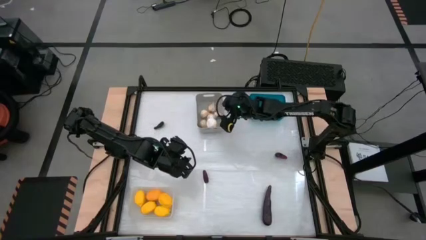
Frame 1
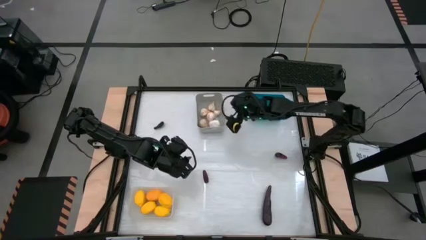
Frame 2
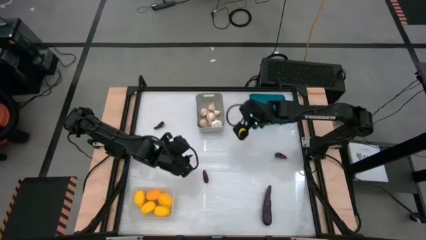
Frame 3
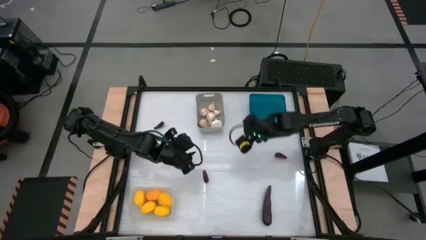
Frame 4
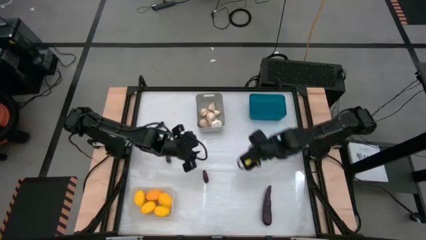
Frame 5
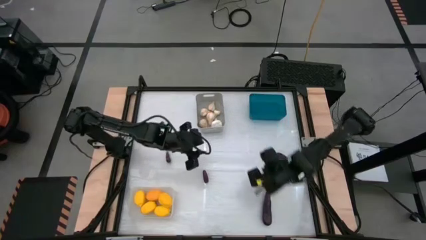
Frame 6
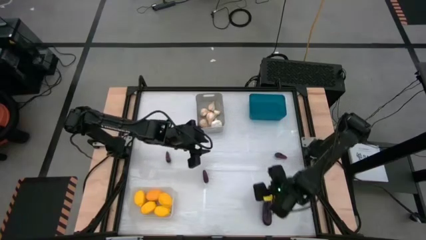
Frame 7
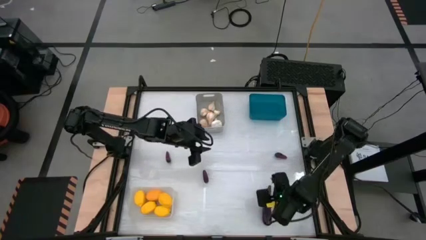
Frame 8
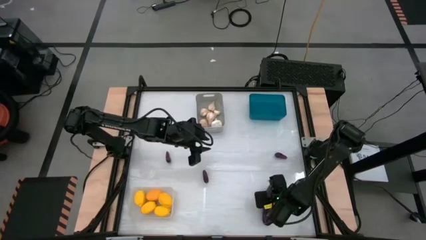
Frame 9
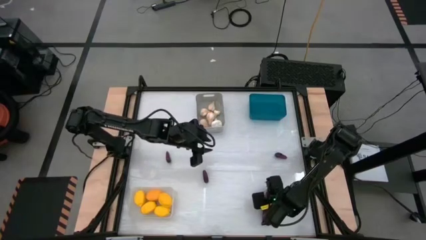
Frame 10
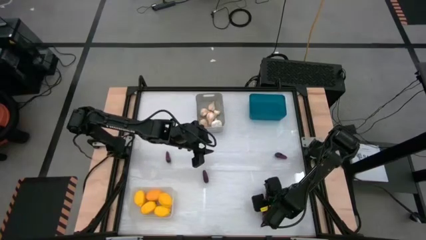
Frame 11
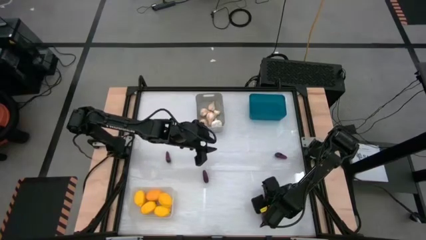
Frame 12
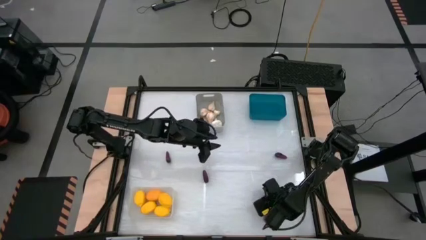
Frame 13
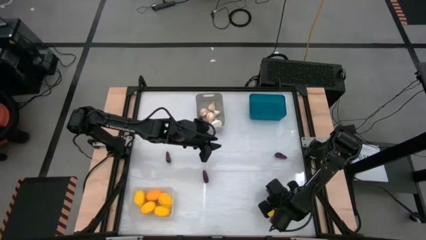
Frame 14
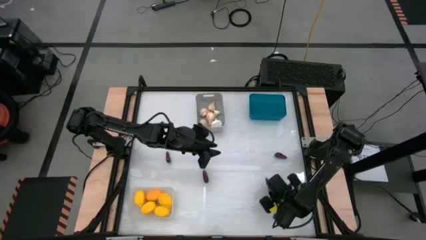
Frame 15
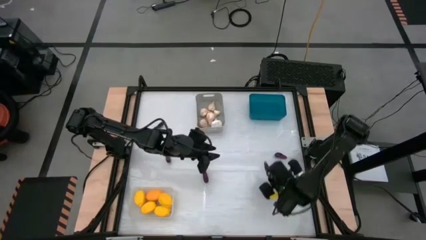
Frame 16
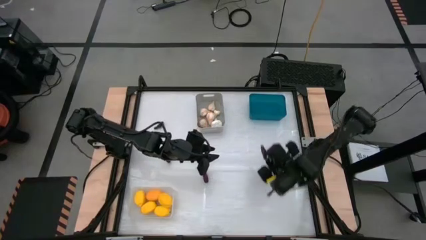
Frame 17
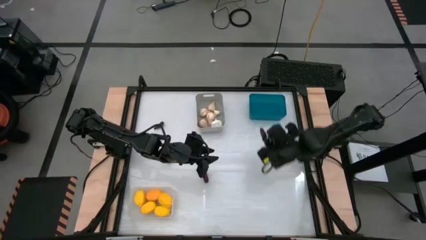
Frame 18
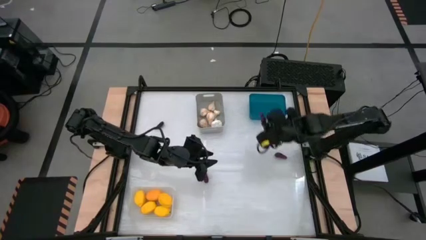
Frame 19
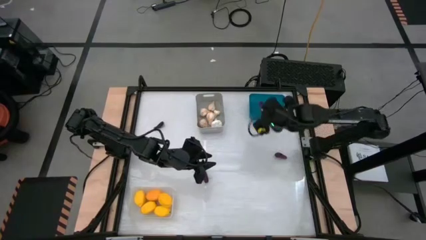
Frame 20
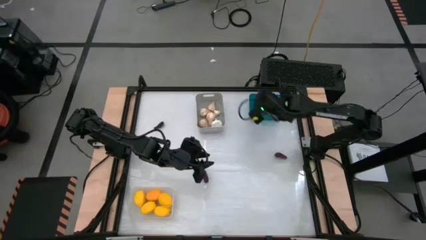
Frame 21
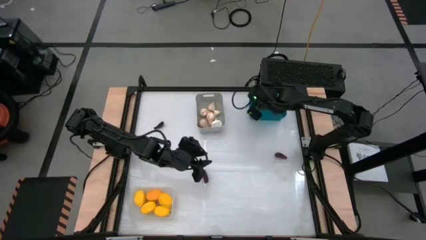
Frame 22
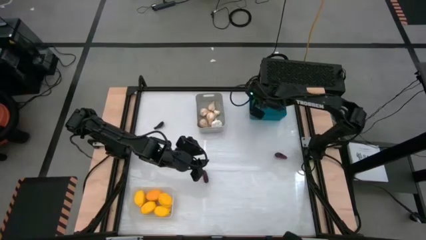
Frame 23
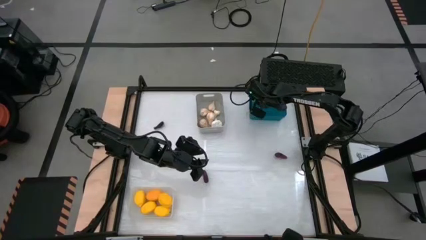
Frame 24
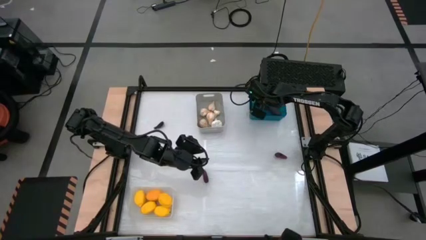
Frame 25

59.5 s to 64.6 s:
Task: Sort produce into baskets
Put the egg plant into the blue bin

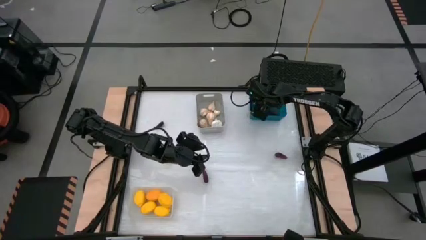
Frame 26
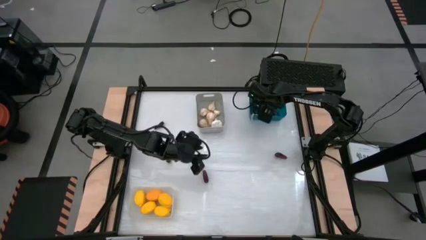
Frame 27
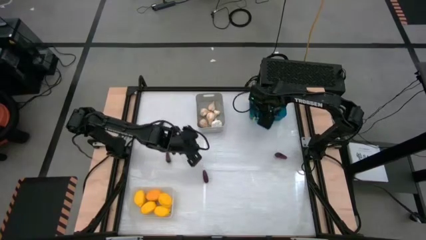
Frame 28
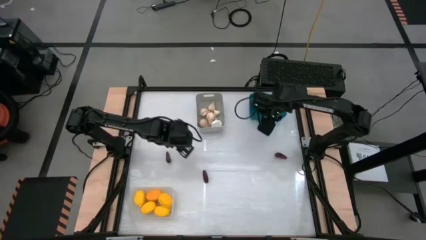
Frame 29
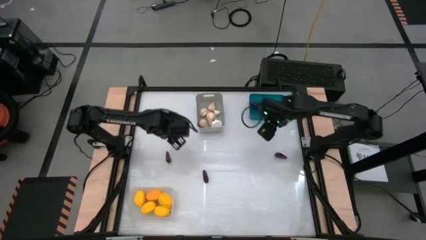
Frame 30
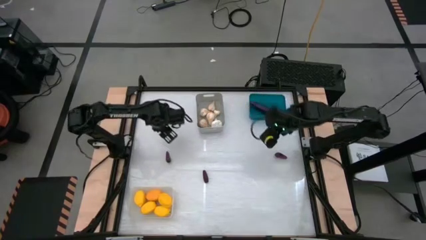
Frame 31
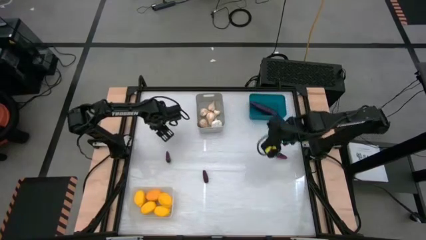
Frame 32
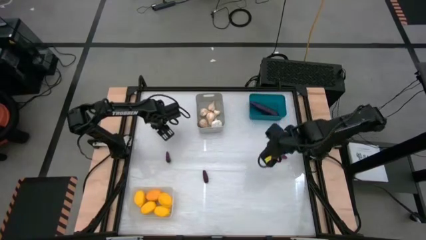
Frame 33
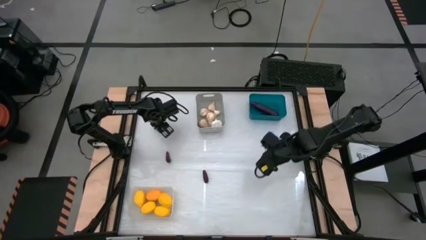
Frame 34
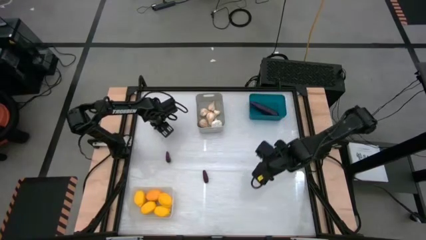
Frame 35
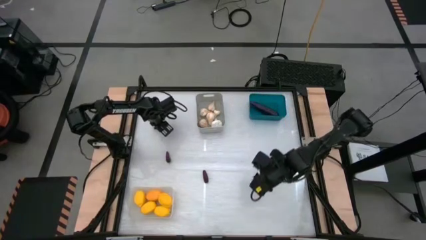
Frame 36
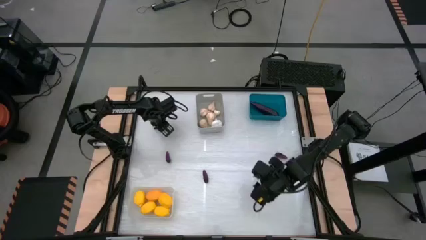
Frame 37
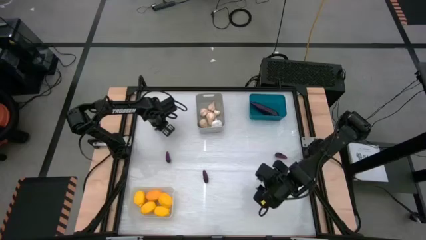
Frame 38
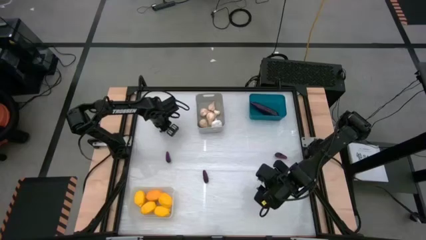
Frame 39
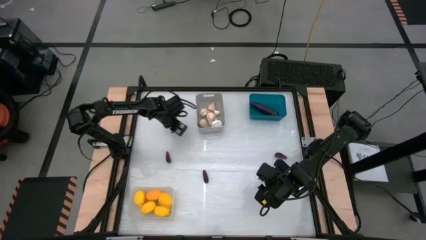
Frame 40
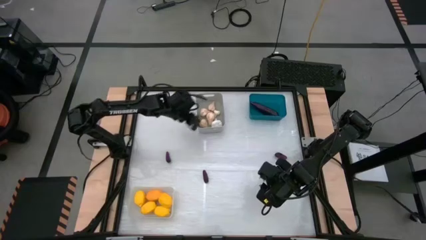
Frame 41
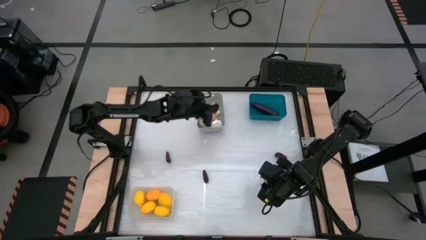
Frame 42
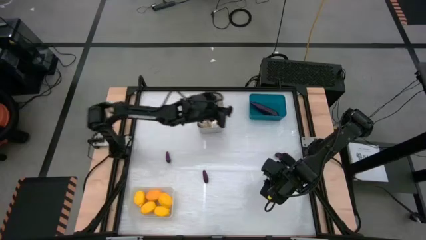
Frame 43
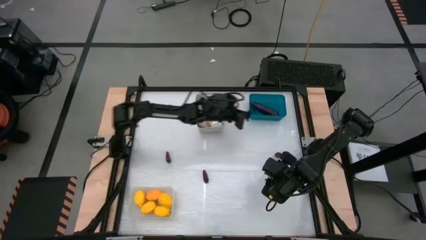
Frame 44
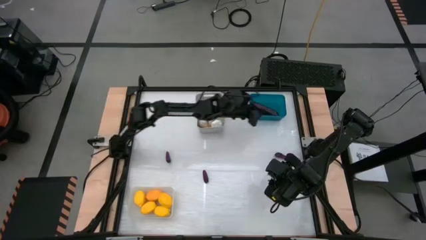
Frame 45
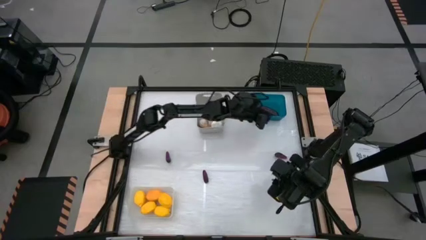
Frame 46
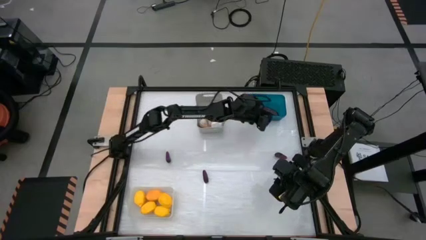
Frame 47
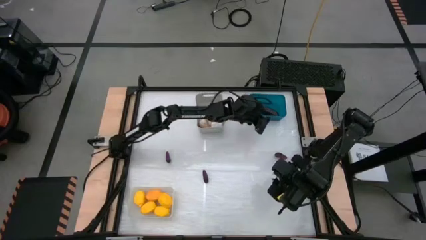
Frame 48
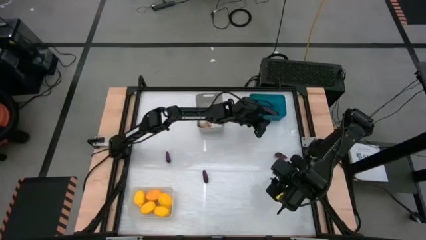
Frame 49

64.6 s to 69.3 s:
Put the egg plant into the blue bin

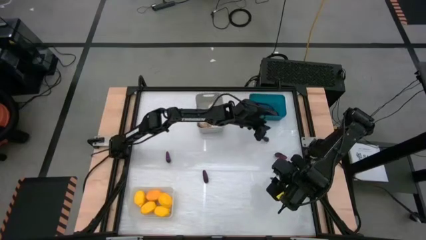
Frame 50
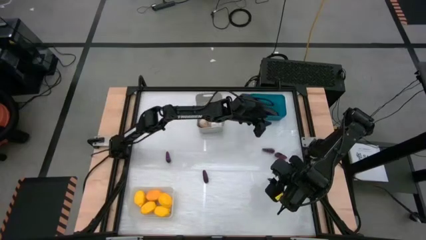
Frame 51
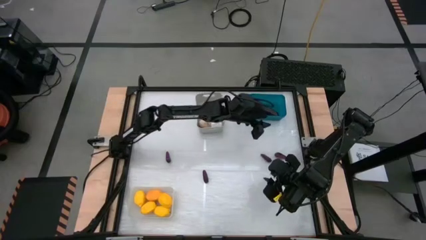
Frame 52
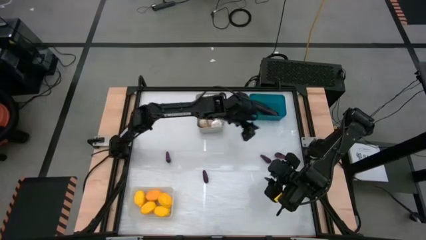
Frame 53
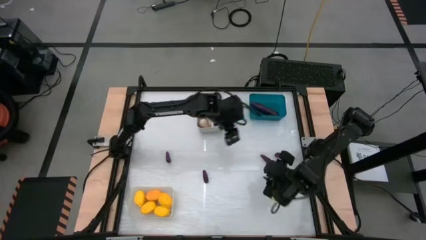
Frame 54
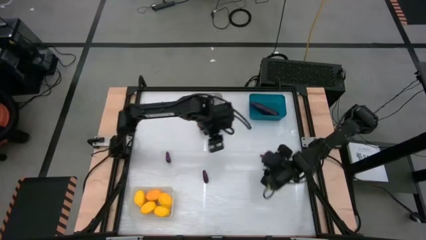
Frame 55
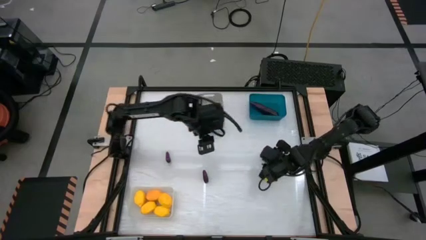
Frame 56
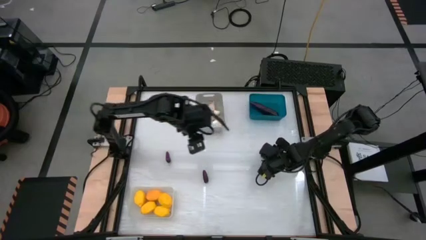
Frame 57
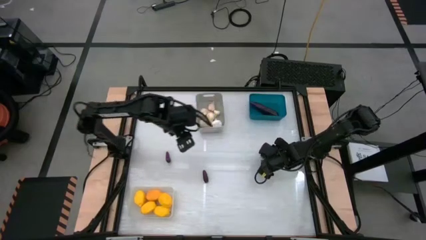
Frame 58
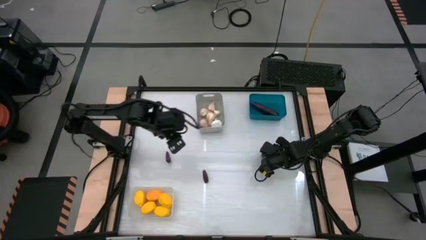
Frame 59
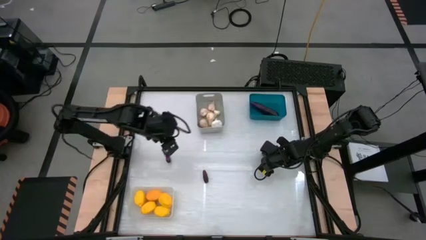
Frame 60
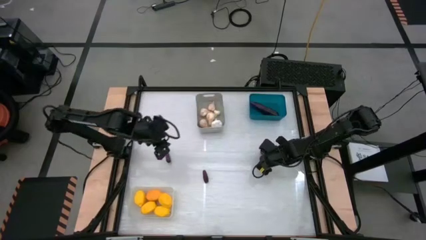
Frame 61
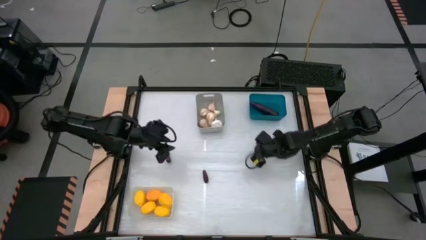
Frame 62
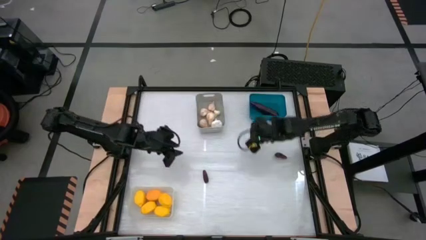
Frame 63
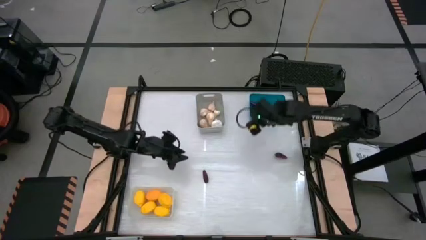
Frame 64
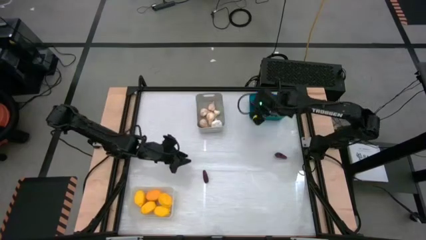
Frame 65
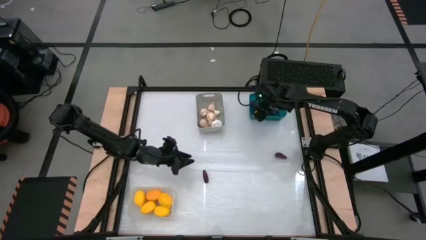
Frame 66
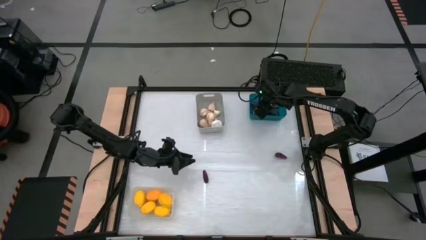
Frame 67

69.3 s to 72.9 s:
Put the egg plant into the blue bin

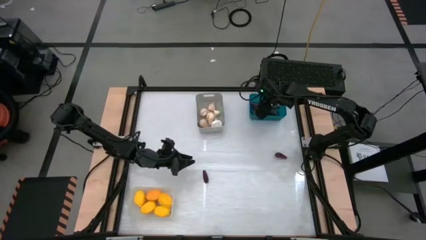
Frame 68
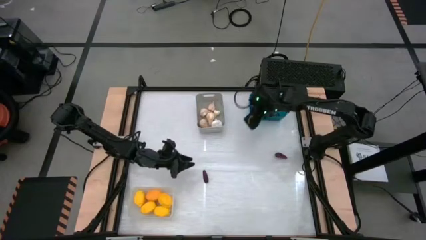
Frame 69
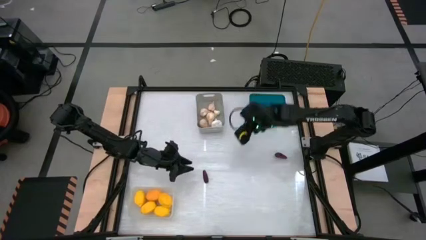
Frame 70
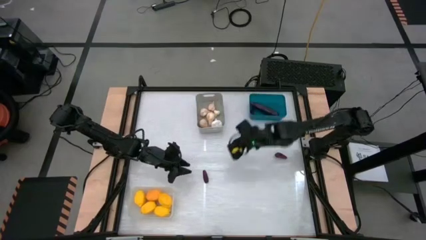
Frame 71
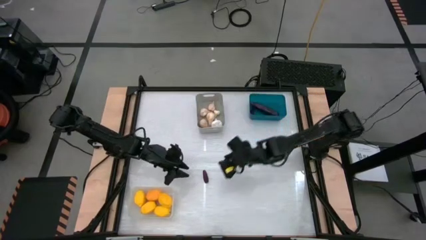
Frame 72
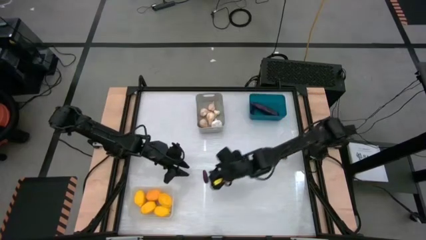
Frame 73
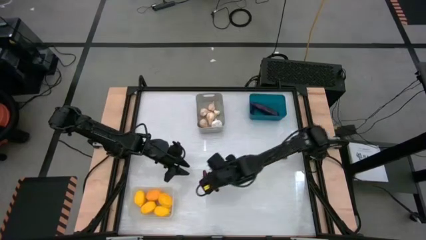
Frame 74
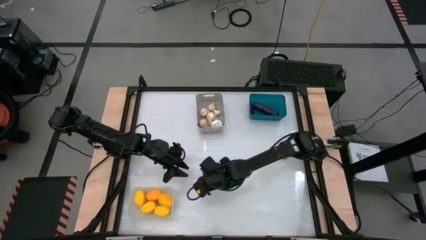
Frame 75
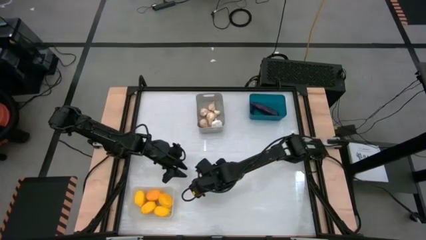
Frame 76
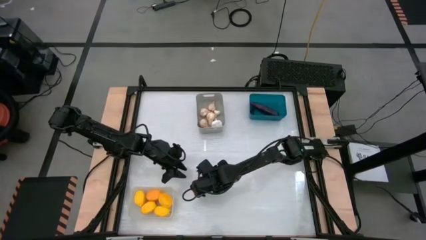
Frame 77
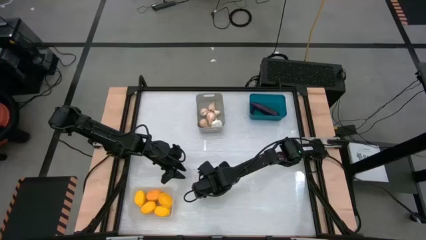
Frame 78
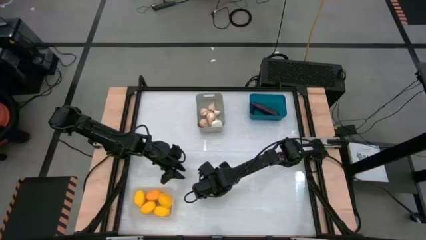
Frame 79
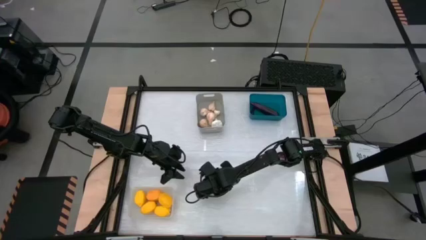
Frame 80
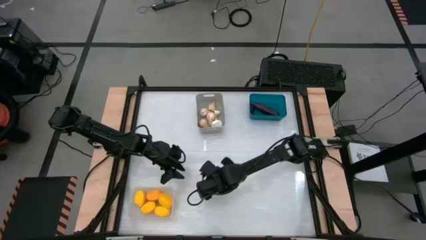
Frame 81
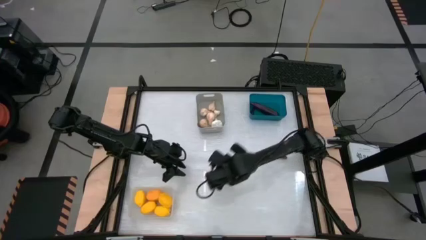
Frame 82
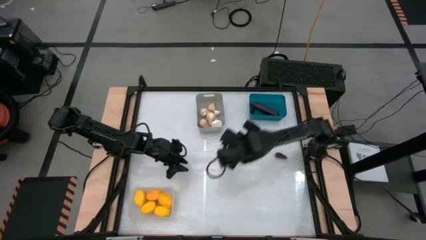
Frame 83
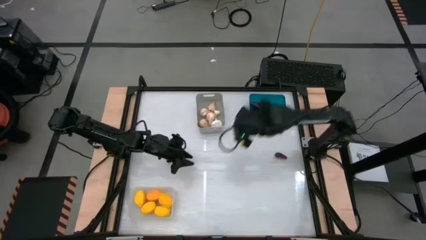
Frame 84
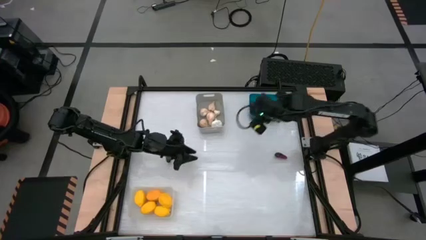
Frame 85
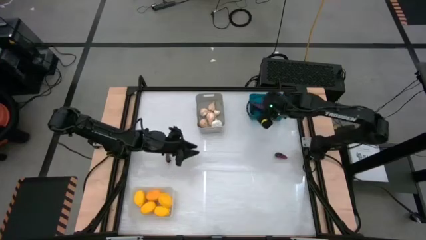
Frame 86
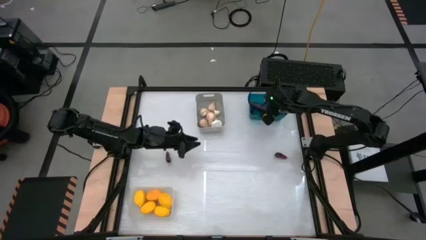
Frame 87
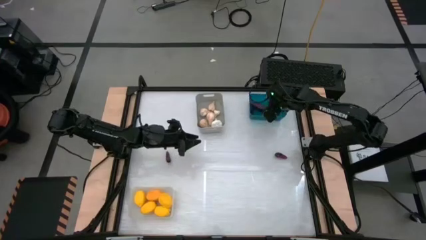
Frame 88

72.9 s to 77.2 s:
Put the egg plant into the blue bin
